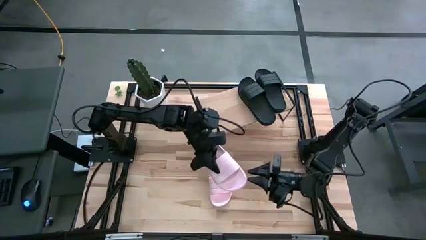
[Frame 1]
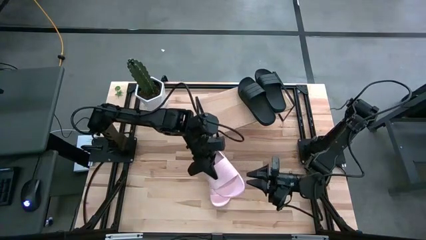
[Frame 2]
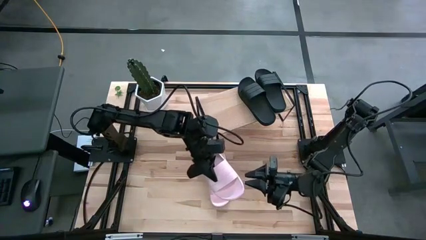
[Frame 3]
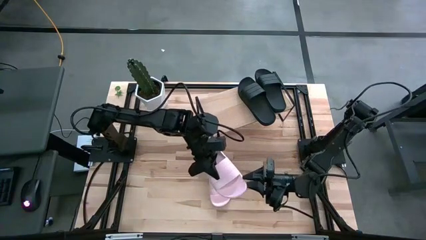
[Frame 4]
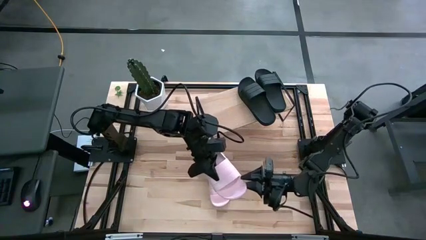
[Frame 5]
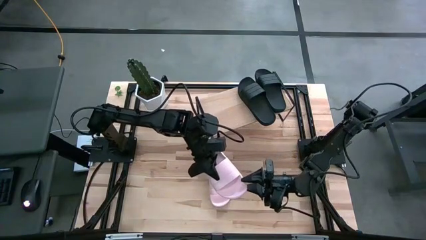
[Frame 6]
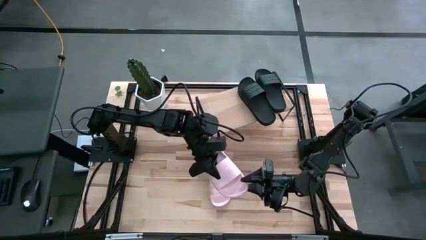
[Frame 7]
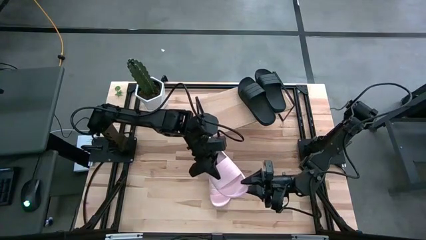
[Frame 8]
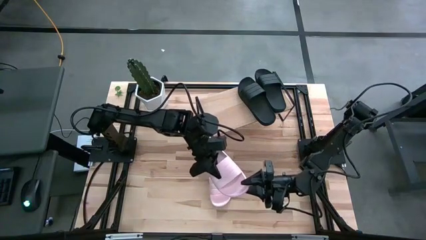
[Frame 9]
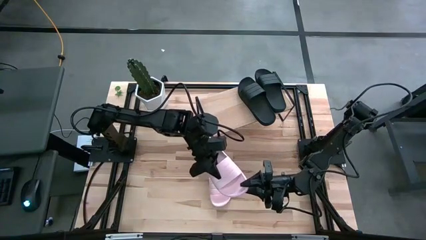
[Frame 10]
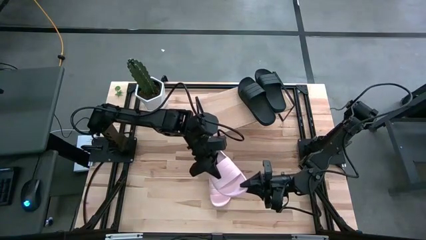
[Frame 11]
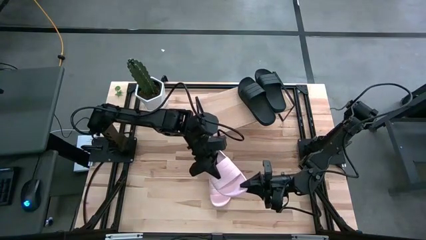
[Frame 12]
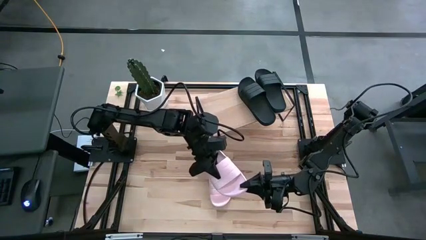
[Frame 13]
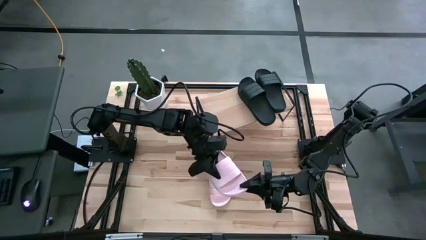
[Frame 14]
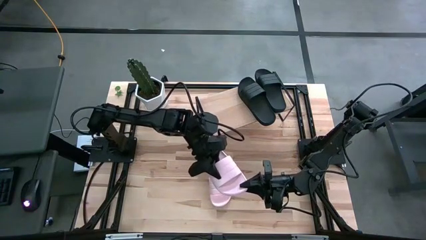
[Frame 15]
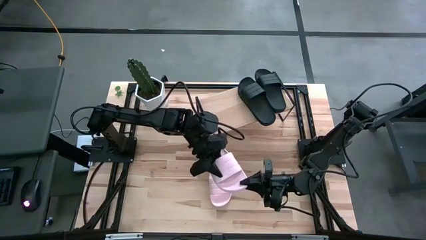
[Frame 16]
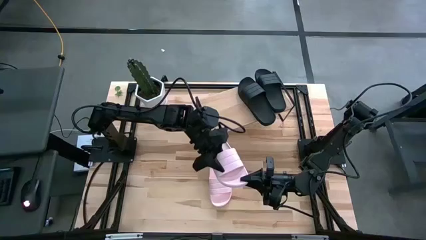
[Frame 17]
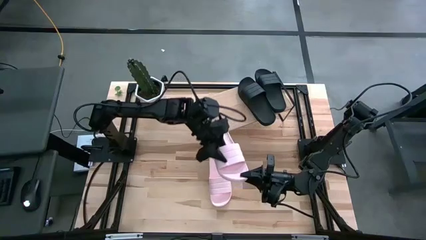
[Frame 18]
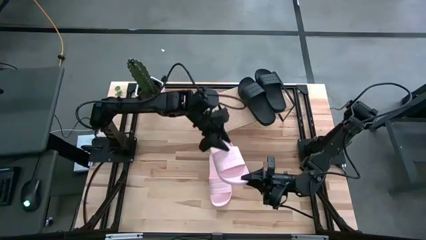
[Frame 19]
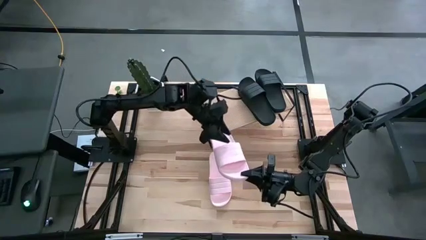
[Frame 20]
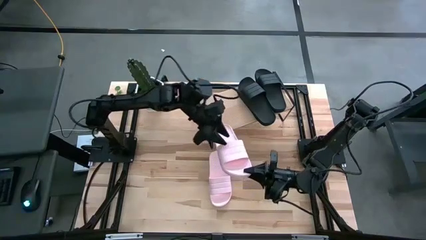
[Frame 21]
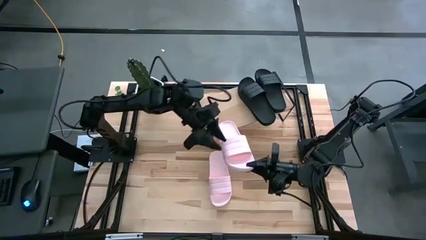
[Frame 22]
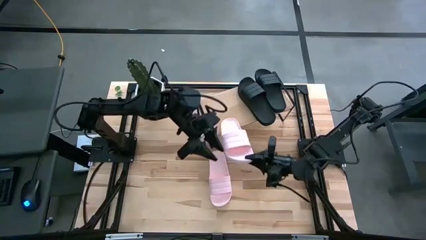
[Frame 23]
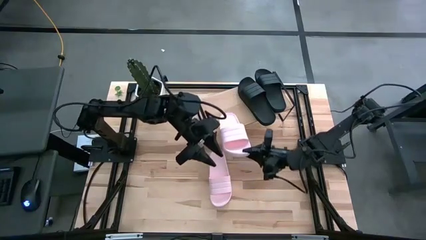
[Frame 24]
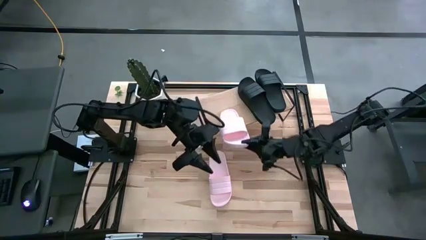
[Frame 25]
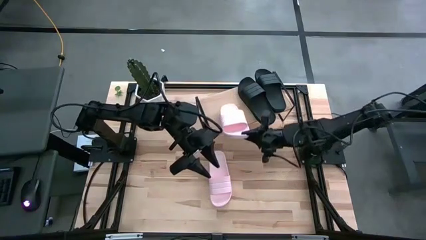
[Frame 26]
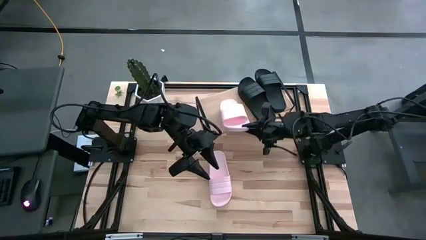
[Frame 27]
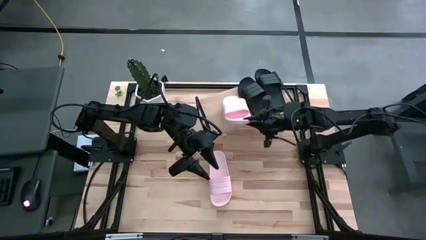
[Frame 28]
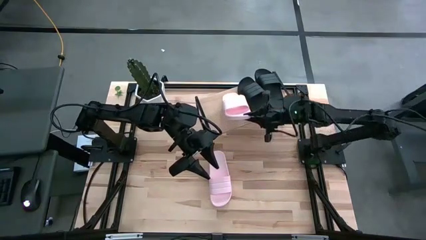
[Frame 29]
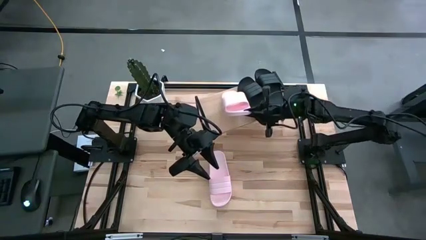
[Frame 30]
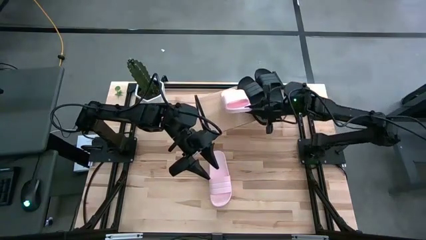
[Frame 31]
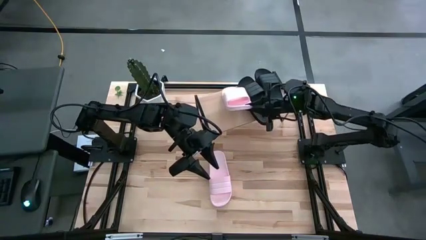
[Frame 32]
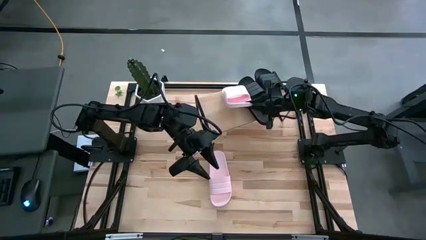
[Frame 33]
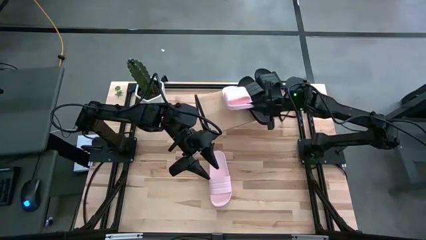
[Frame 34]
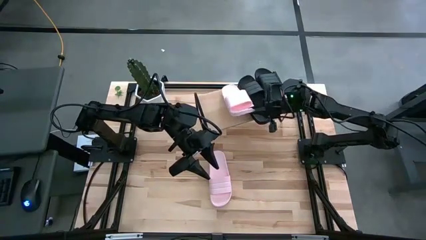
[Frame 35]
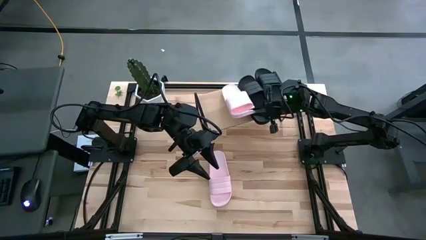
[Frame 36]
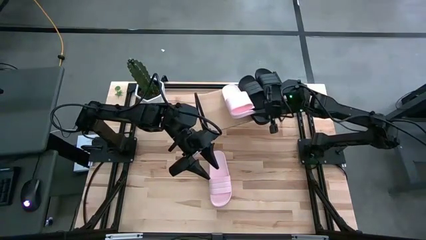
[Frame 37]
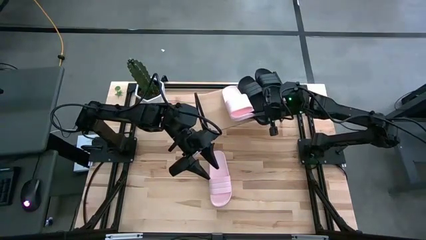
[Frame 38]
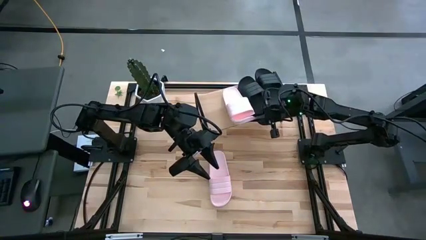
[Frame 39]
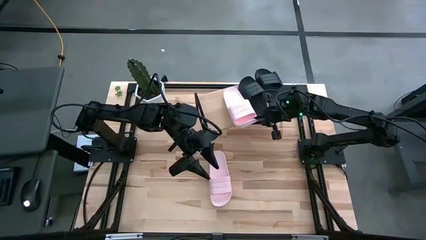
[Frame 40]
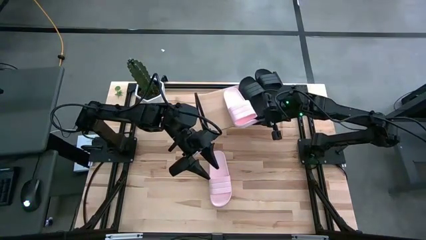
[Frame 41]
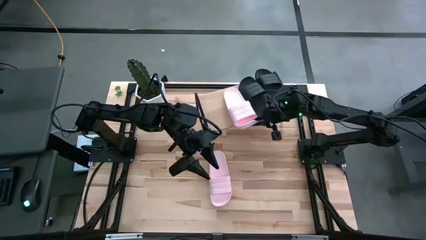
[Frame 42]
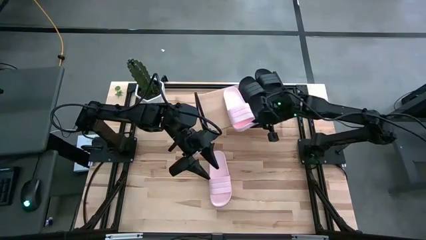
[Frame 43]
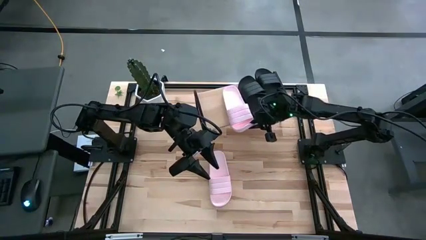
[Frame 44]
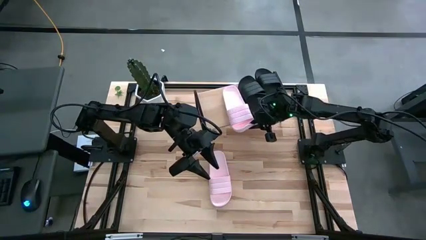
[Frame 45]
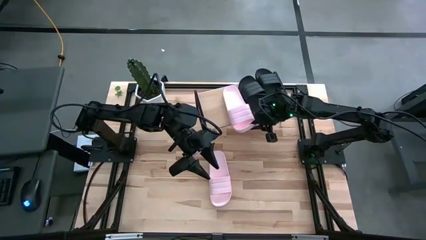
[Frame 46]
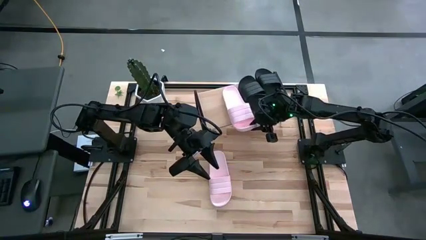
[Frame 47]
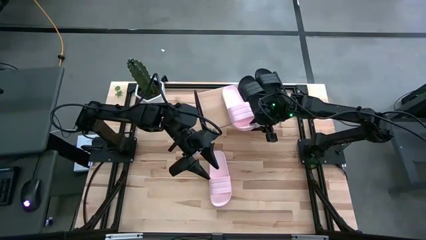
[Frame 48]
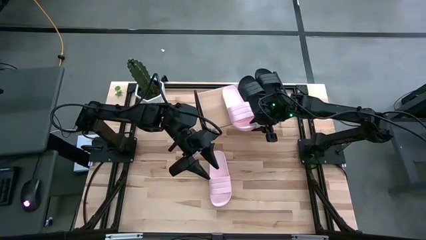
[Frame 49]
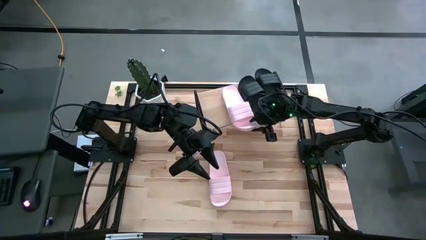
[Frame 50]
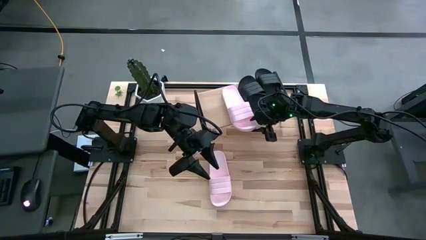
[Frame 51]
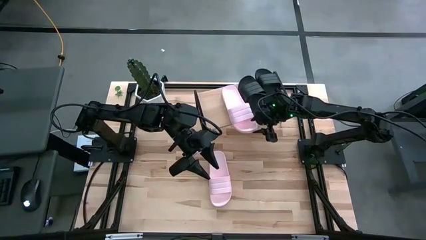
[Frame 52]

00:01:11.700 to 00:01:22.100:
Task: Pick and place slides into the shelf
Put the left pink slide on the shelf
